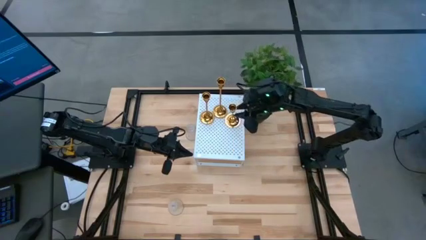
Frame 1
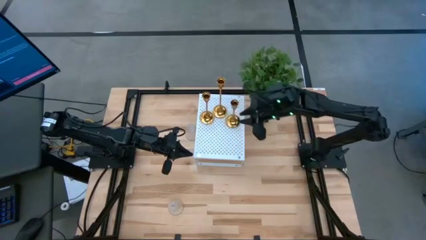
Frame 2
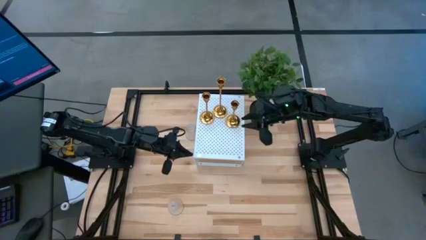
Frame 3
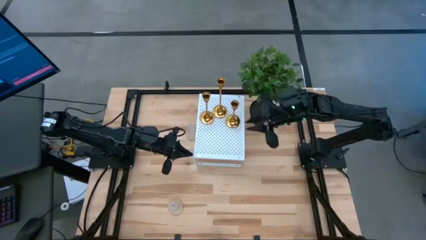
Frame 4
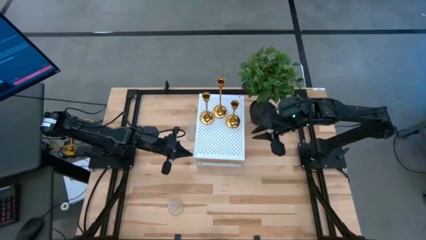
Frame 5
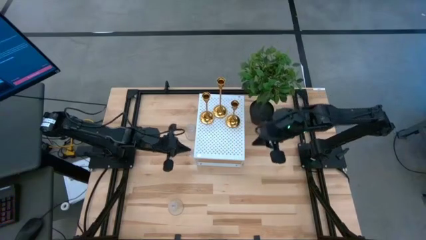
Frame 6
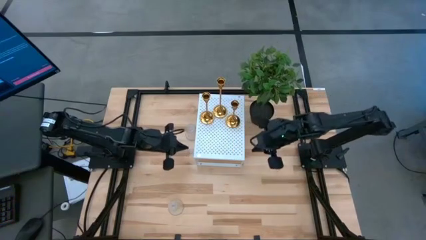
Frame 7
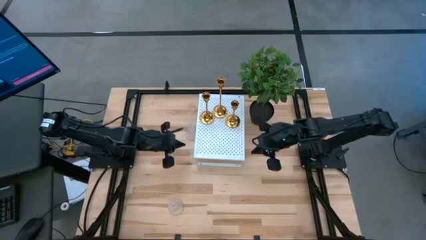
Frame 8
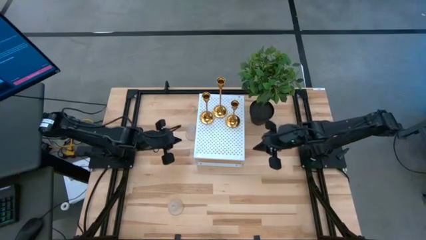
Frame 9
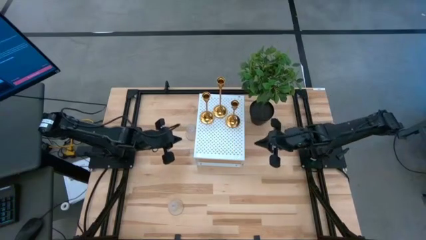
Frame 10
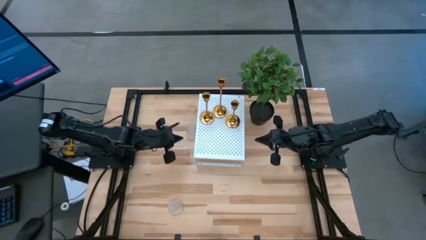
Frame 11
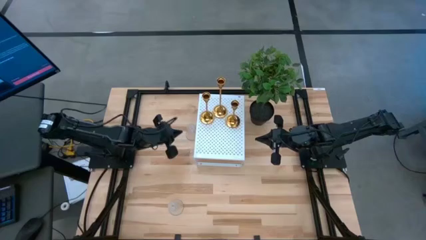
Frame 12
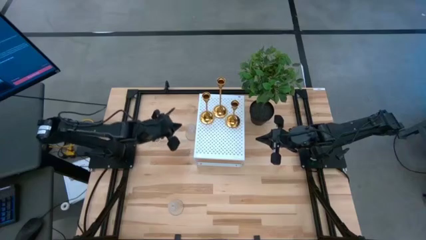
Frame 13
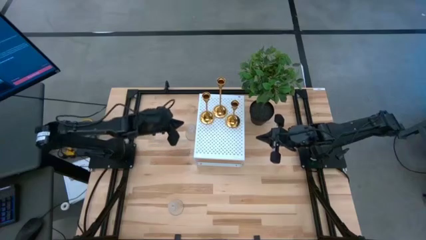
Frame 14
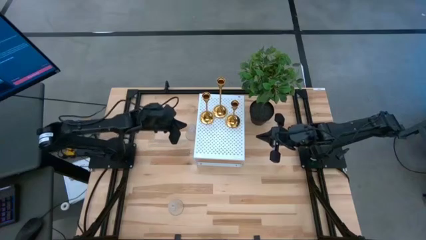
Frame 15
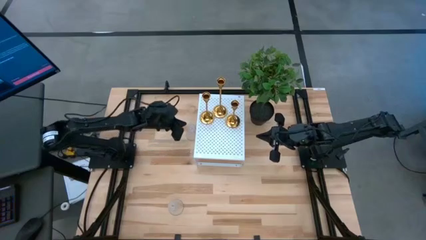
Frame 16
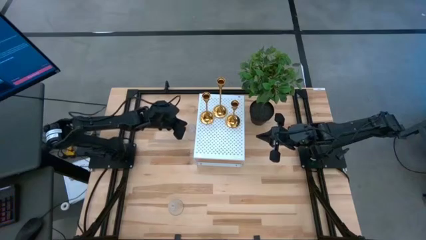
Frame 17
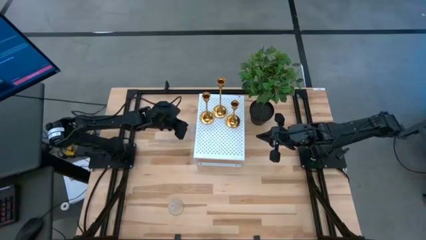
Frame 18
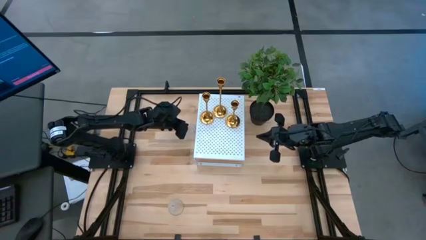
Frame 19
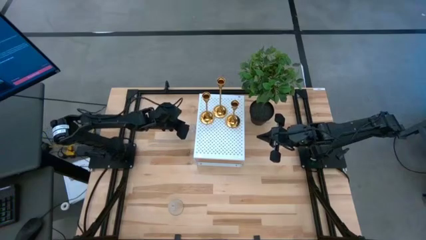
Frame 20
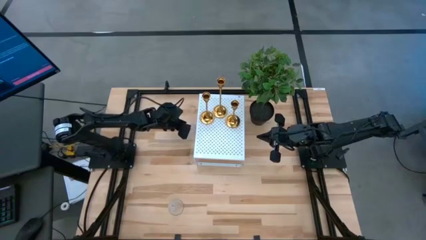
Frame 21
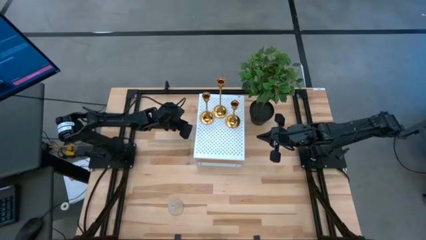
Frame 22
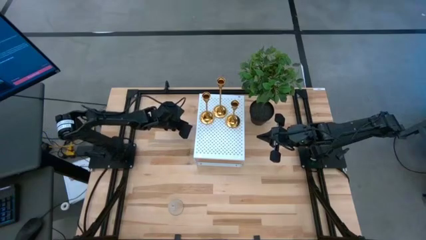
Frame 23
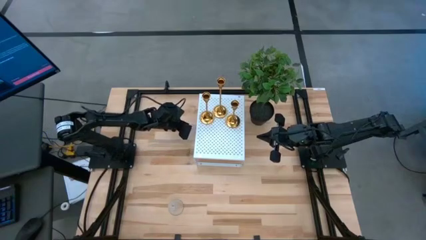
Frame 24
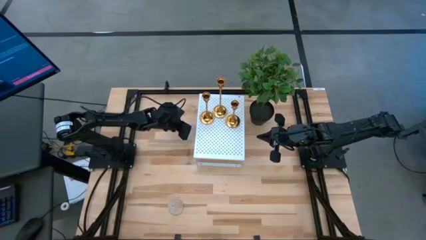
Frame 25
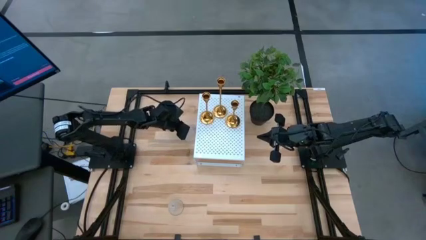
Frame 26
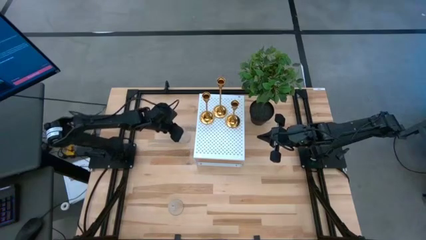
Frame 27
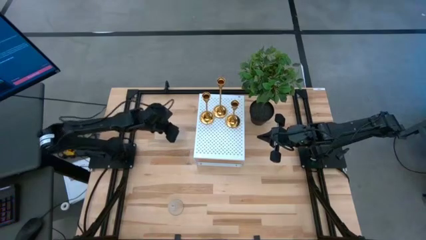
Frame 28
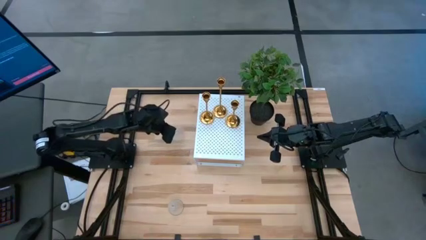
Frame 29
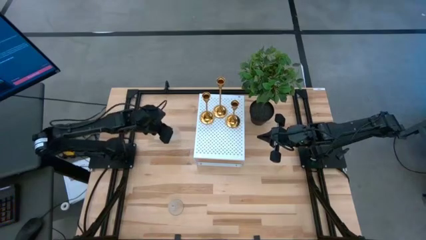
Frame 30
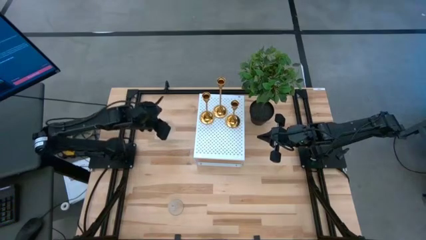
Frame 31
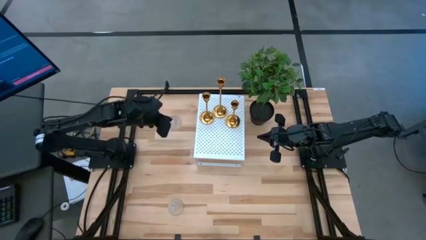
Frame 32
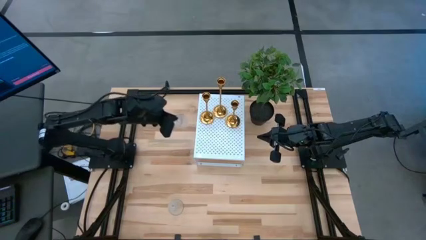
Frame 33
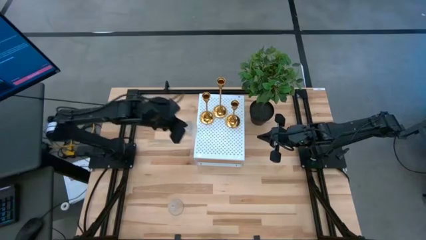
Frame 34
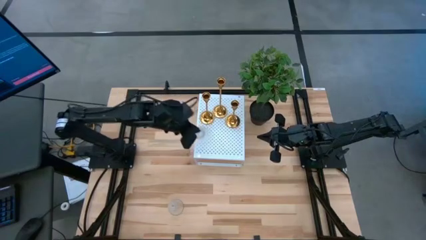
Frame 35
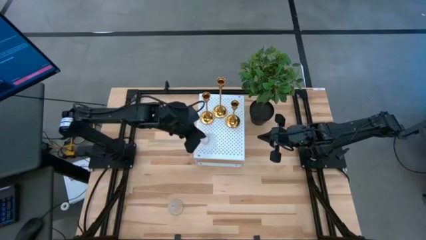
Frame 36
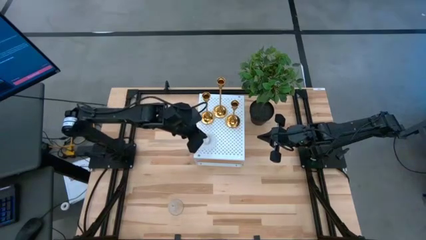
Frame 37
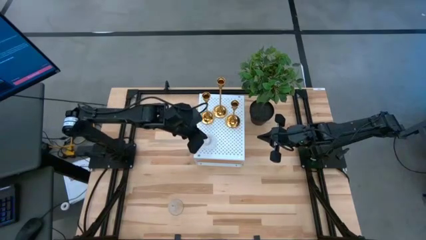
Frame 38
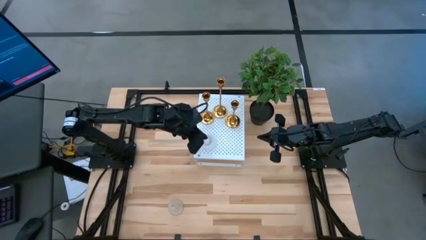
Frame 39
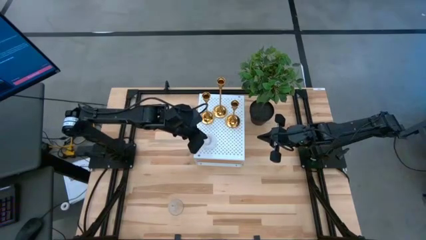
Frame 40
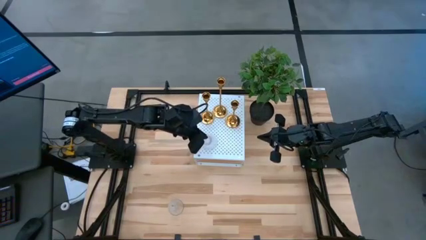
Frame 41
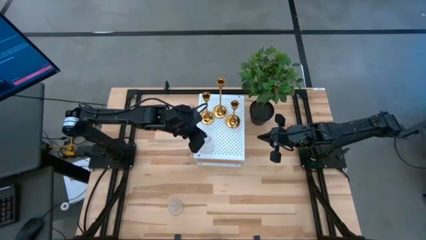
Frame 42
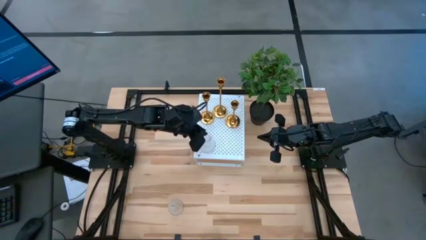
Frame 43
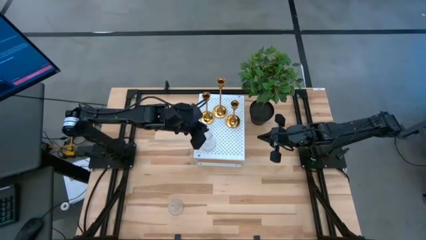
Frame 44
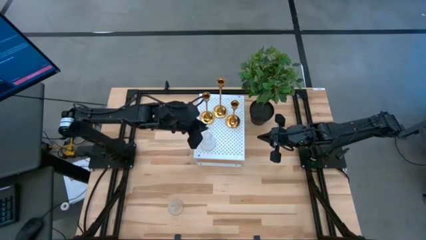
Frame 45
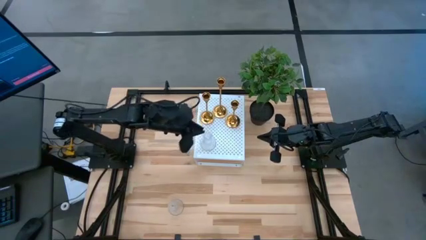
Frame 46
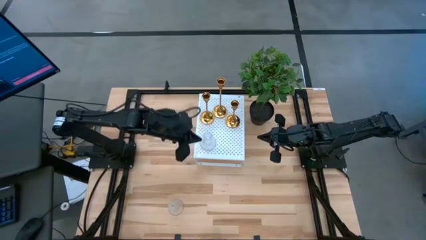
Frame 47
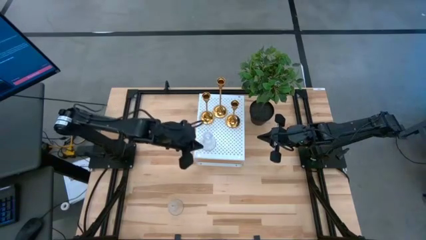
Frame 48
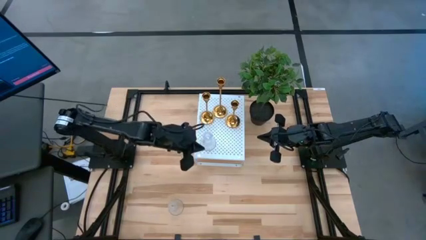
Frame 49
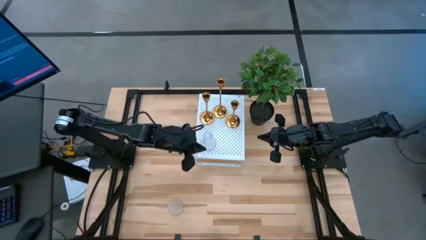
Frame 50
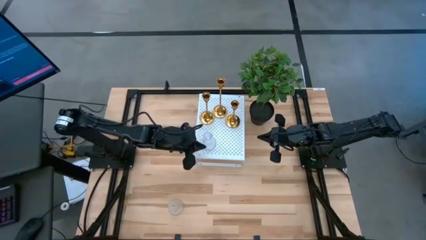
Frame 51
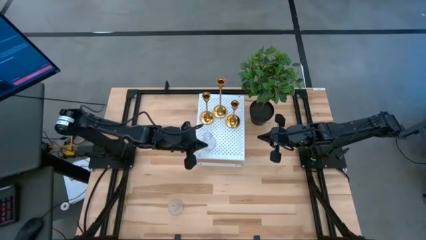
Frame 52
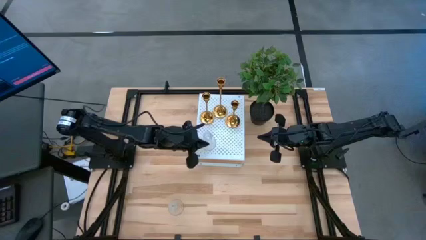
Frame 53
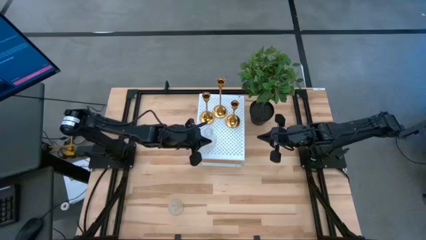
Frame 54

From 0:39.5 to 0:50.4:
Task: Pick & Place candle stick holders
Put the top transparent candle holder on the shelf
